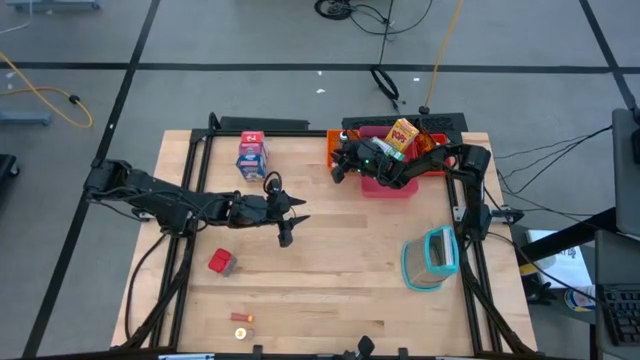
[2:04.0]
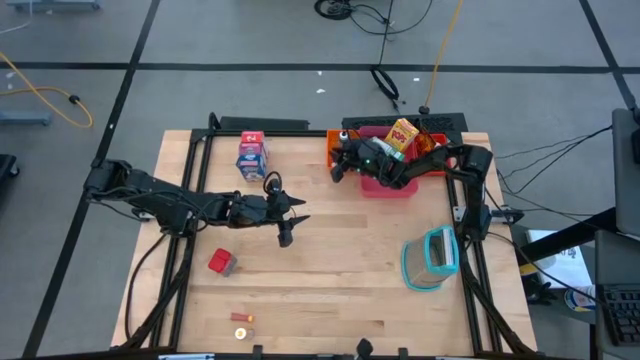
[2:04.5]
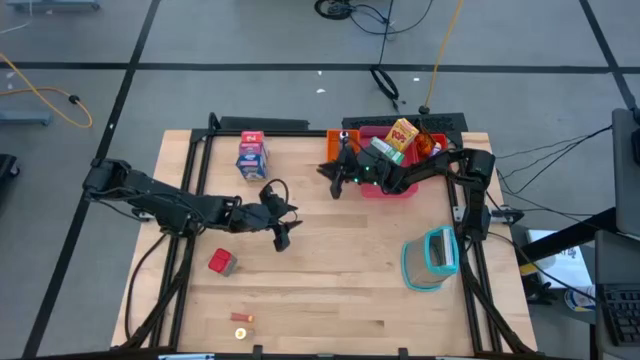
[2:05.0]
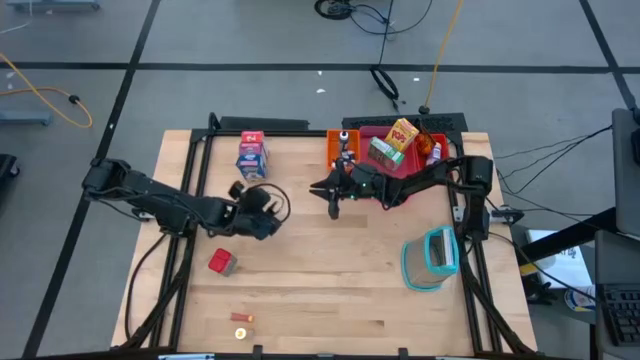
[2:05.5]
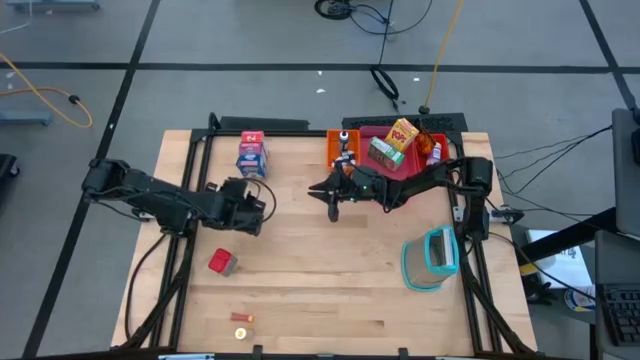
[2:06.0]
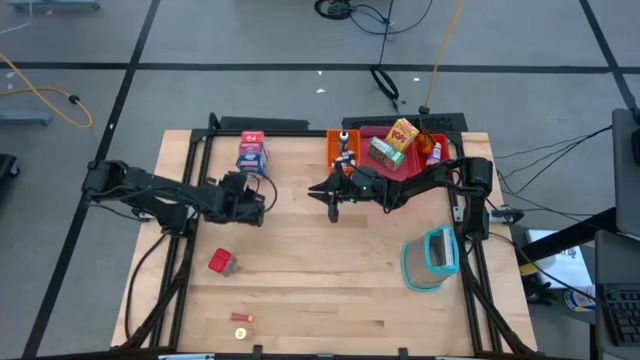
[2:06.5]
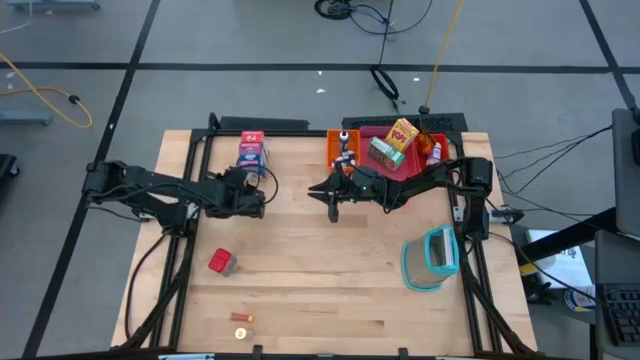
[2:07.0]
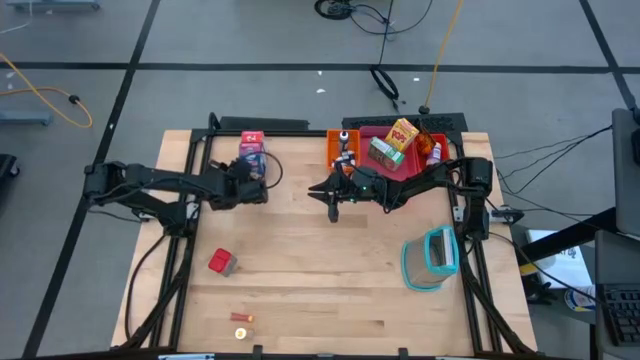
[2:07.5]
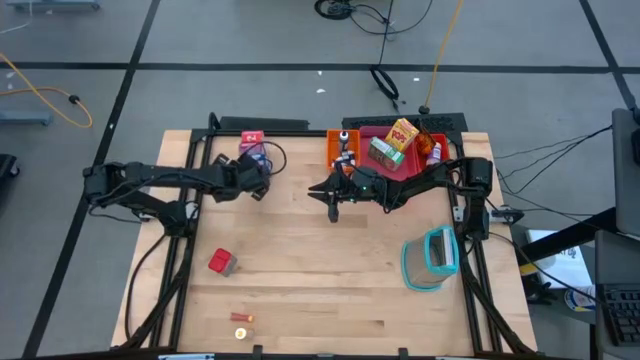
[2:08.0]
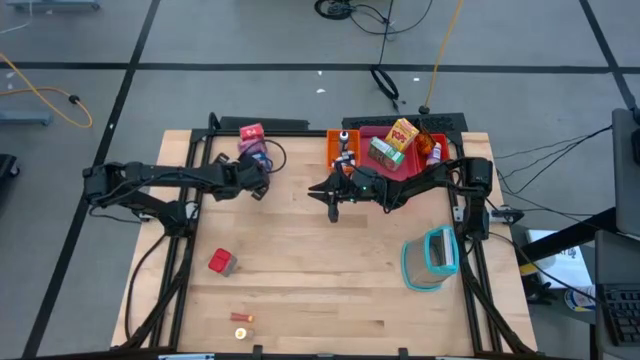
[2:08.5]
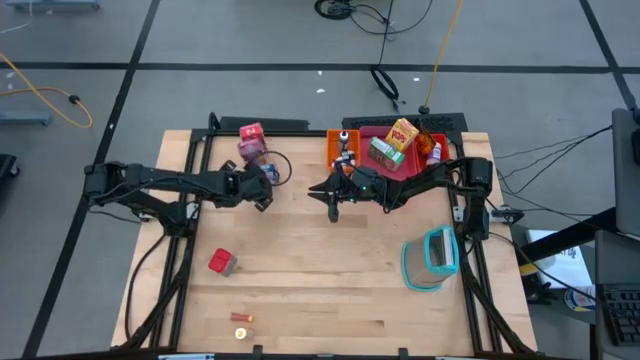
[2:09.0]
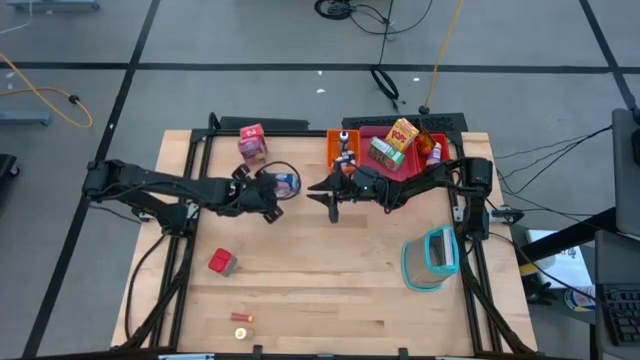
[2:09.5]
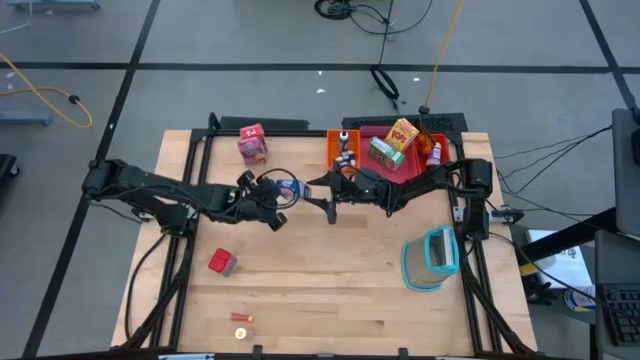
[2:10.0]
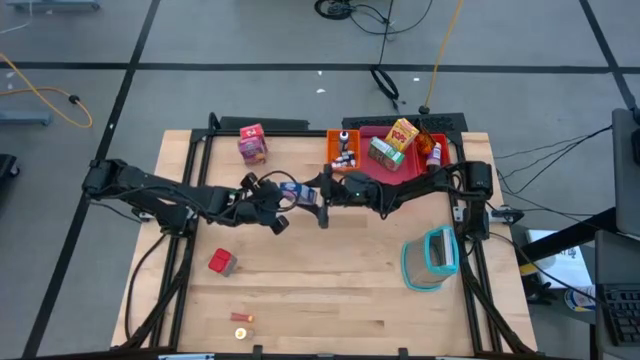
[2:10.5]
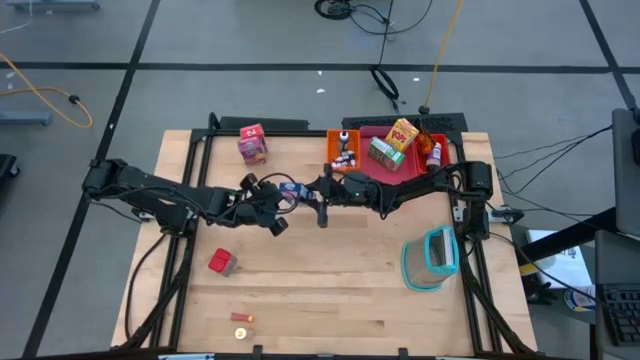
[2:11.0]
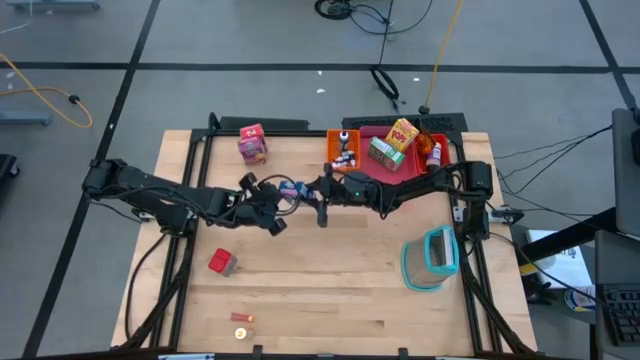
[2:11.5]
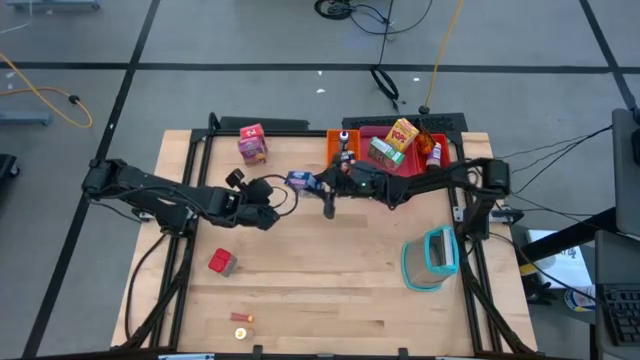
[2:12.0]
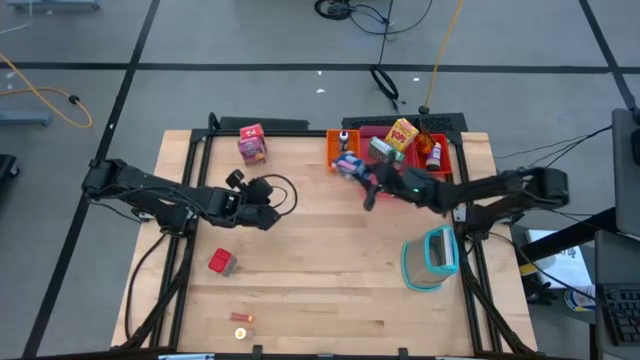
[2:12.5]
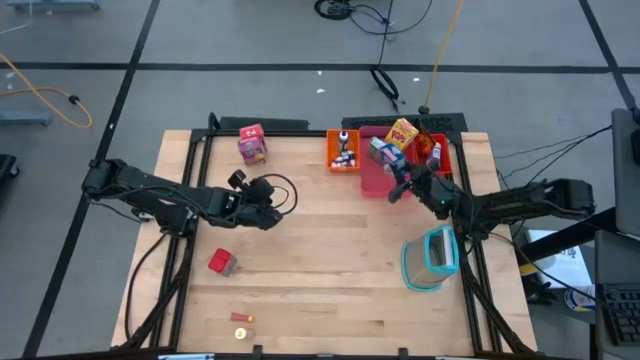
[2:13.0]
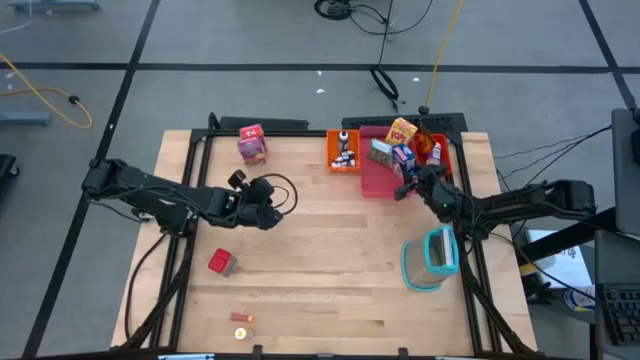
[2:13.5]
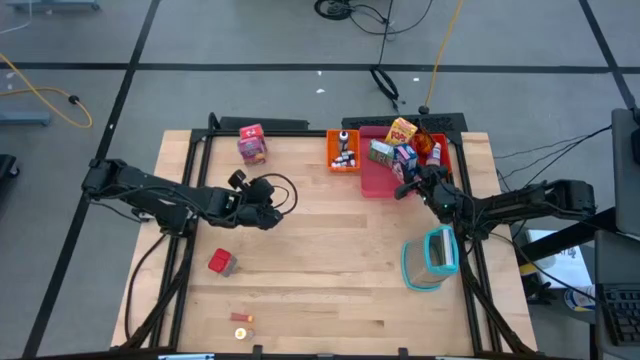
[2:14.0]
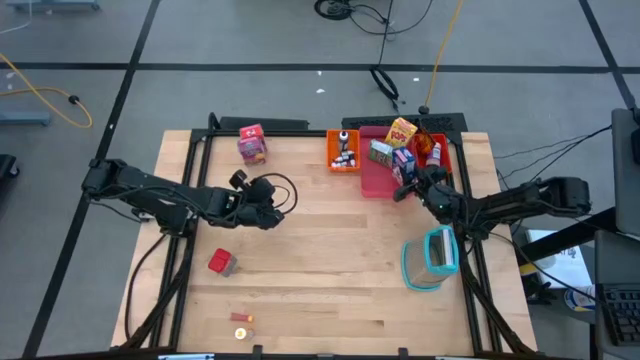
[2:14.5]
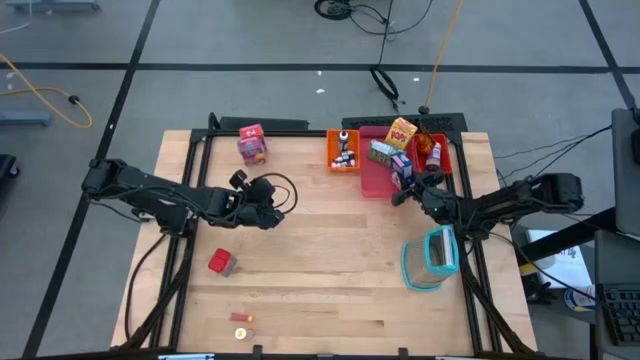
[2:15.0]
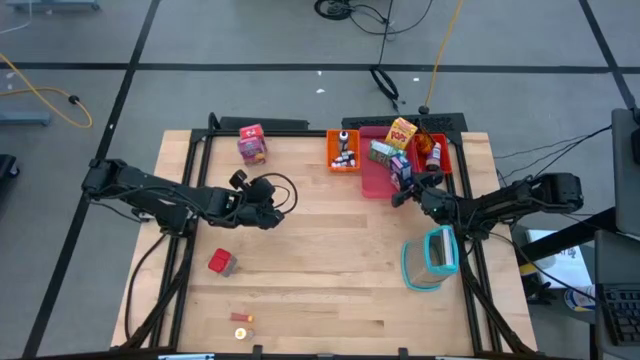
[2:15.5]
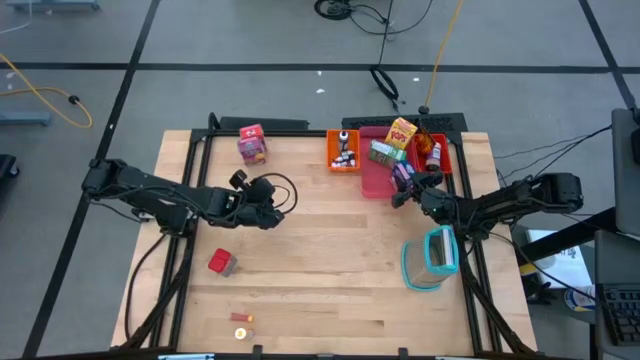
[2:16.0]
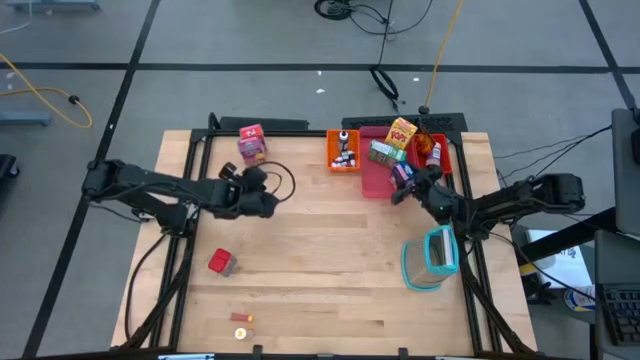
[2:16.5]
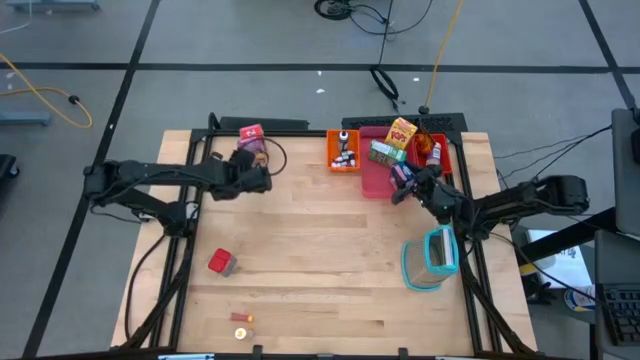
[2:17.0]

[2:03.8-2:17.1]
Task: Pick & Place Kitchen Items
Put the blue cereal box into the pink bin

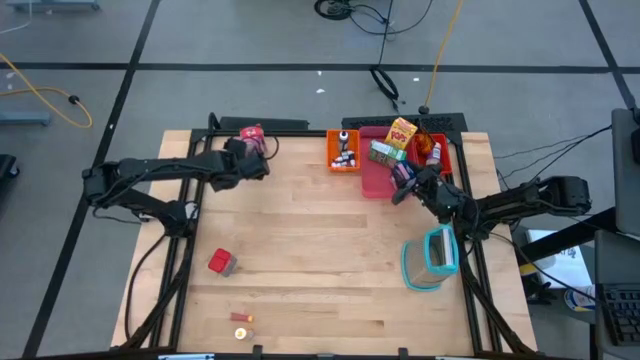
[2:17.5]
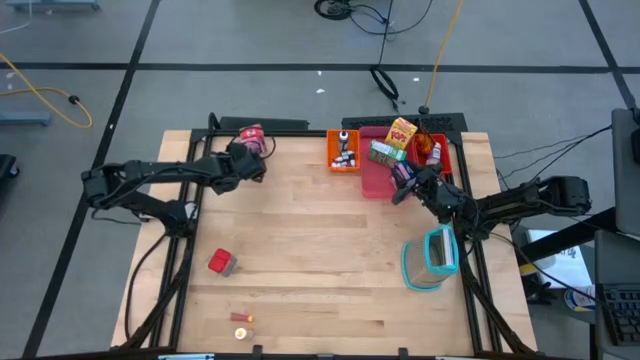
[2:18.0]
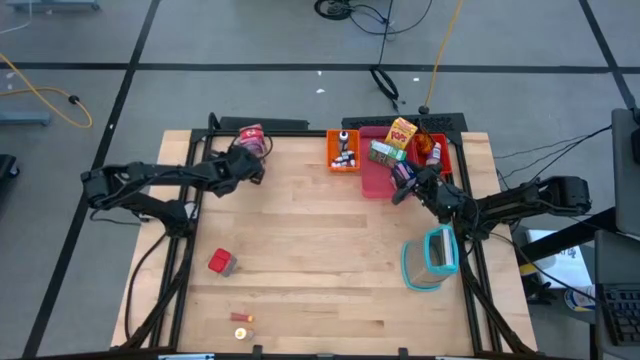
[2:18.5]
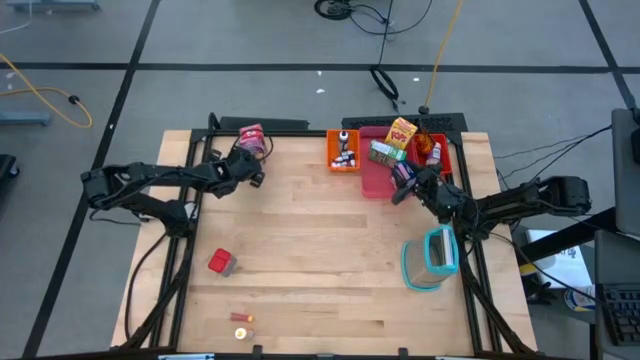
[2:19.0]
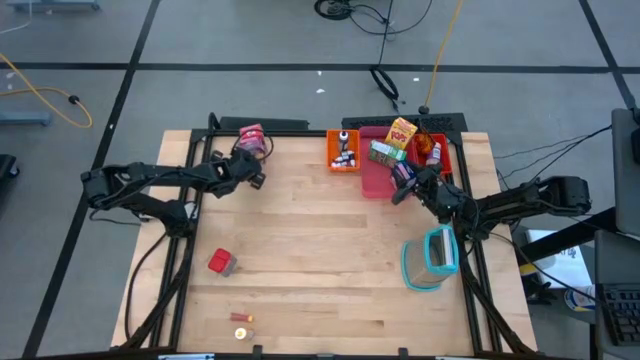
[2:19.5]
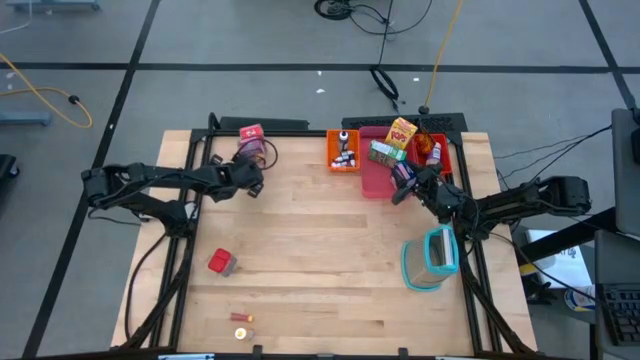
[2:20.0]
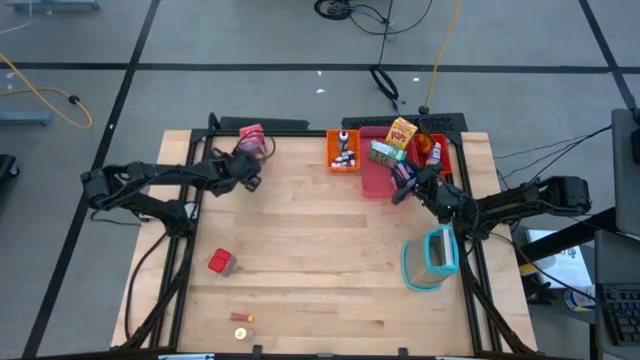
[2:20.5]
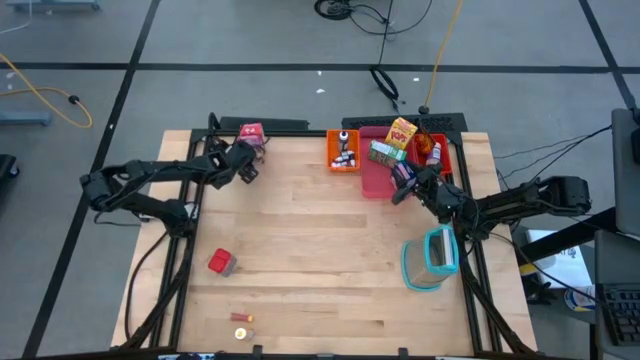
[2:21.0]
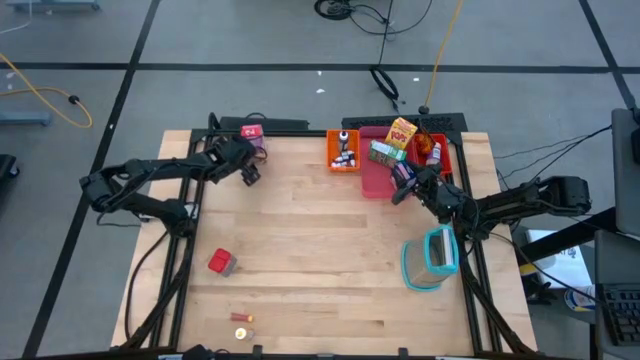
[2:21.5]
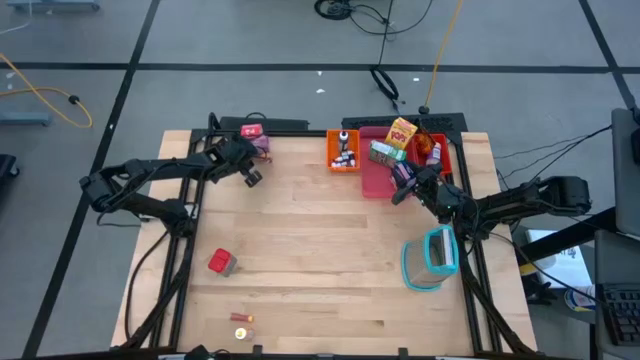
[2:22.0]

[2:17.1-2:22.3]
Put the purple cereal box into the pink bin

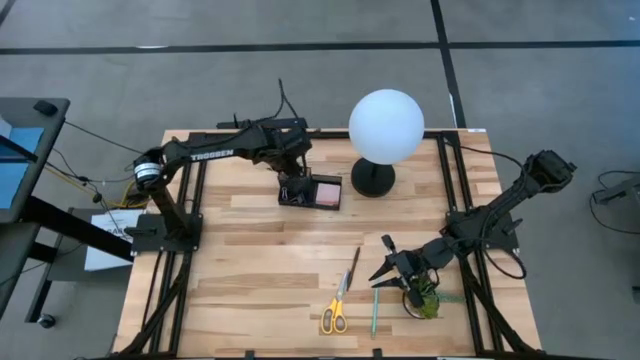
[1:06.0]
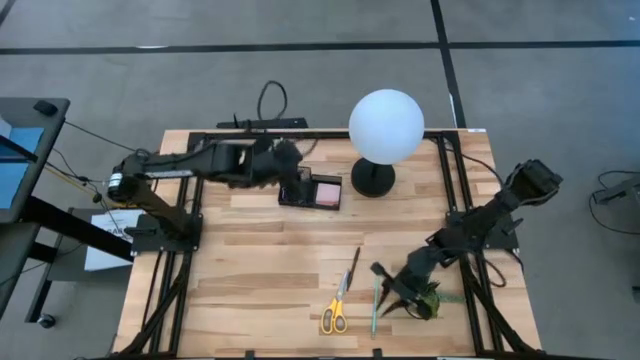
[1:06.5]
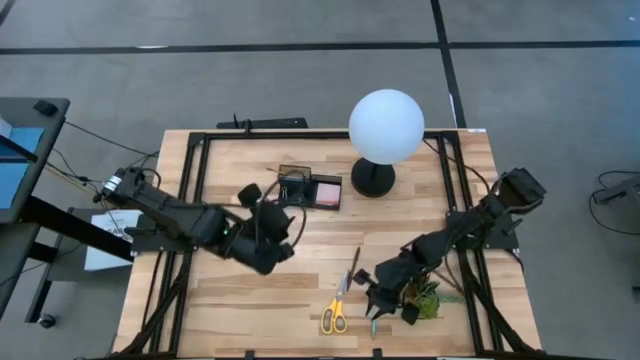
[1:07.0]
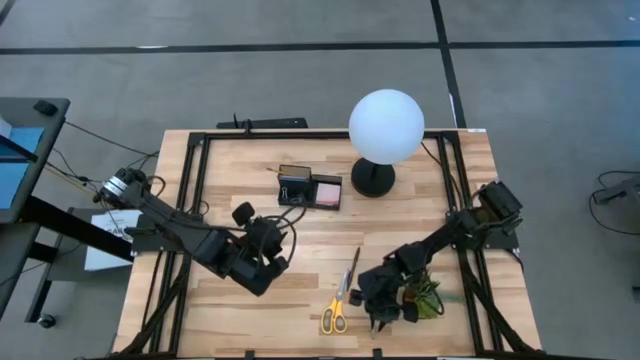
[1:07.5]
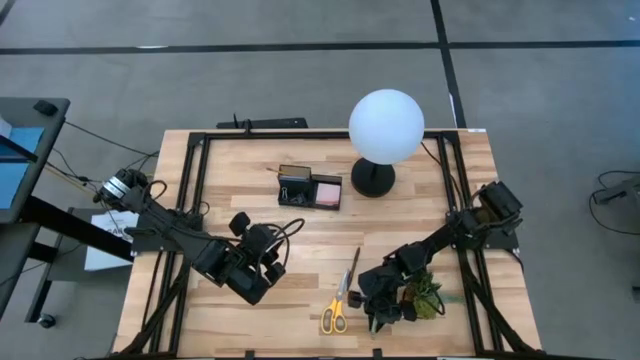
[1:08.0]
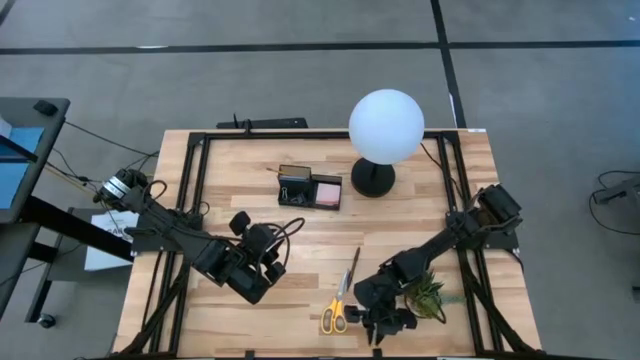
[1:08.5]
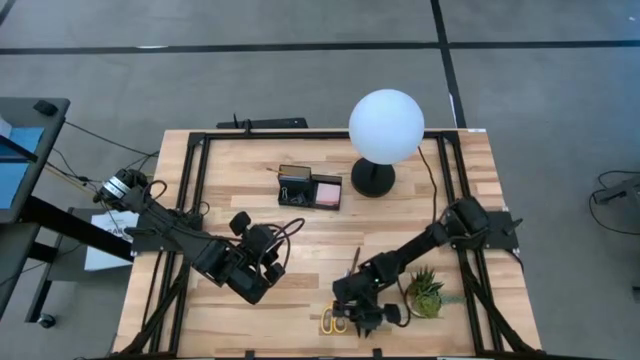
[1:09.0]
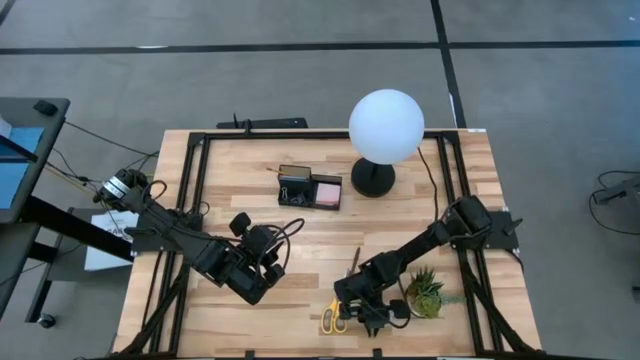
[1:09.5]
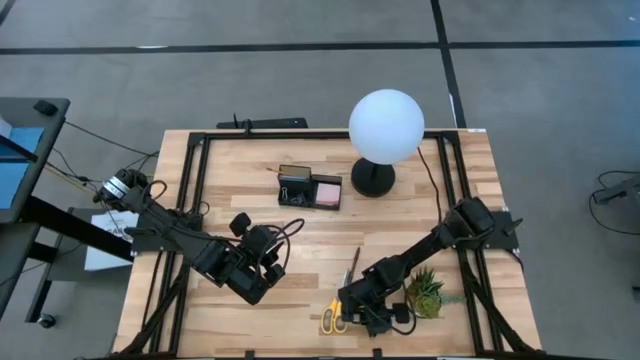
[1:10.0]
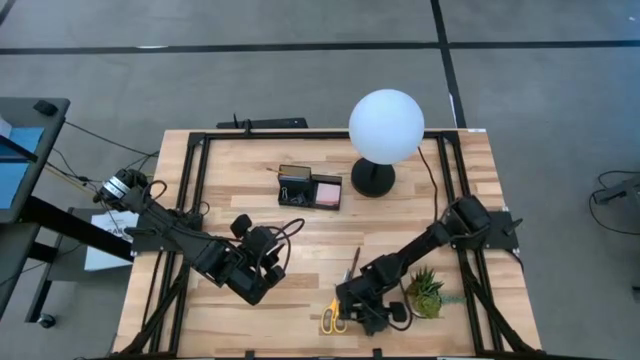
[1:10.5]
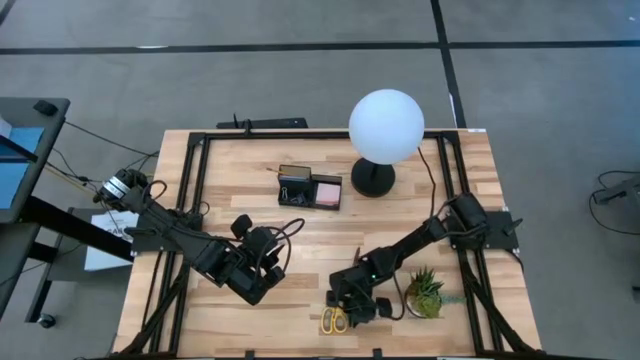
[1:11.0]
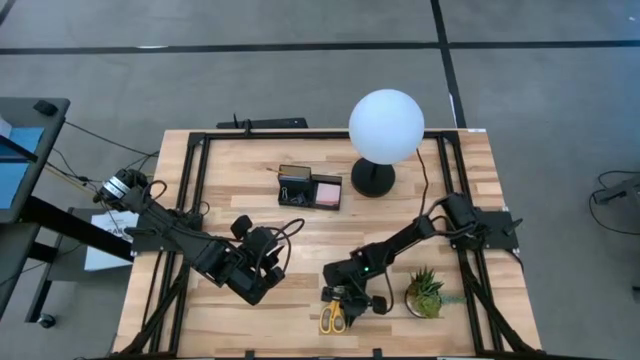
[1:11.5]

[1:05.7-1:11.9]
Task: Pick and place office supplies into organizer
Put the blue pencil into the black desk organizer
